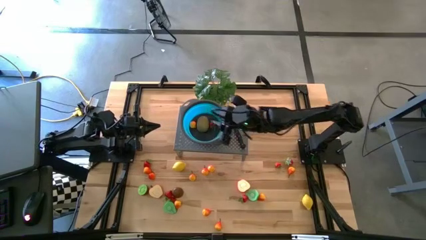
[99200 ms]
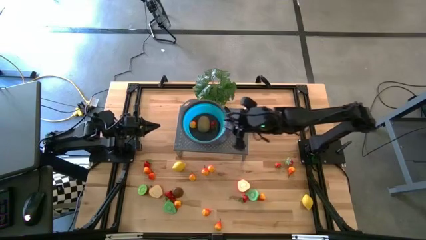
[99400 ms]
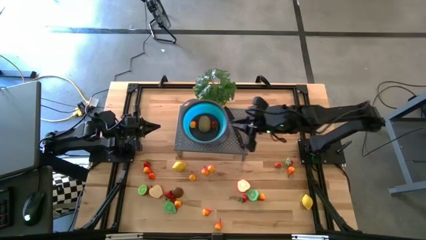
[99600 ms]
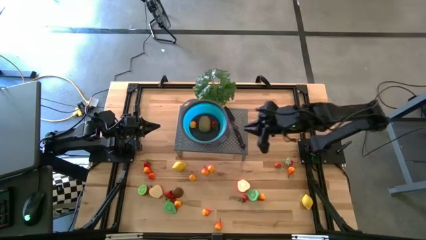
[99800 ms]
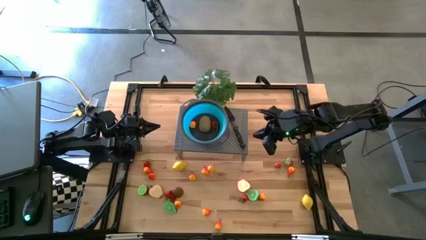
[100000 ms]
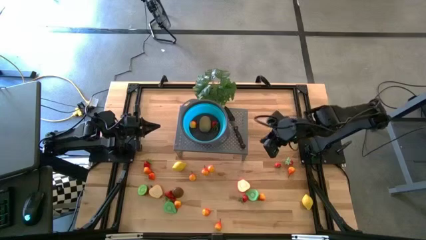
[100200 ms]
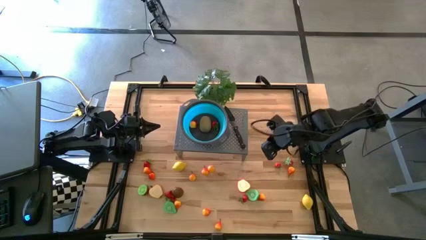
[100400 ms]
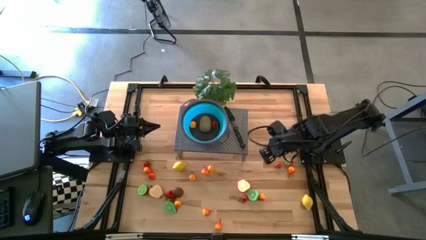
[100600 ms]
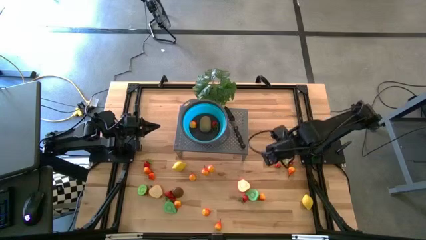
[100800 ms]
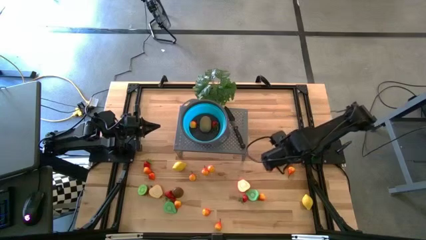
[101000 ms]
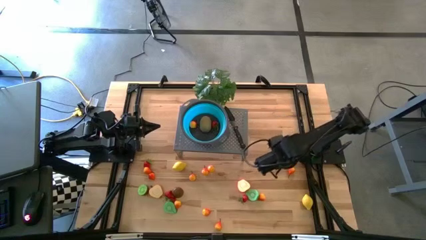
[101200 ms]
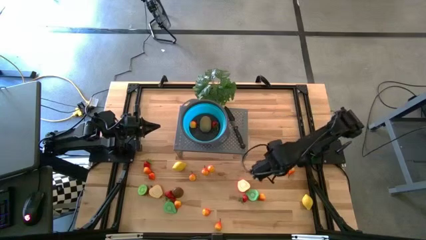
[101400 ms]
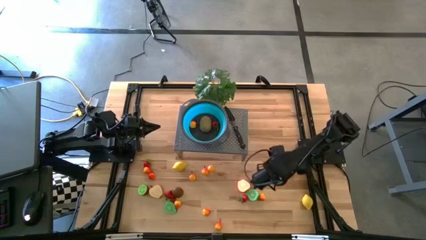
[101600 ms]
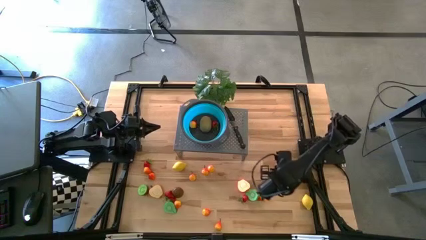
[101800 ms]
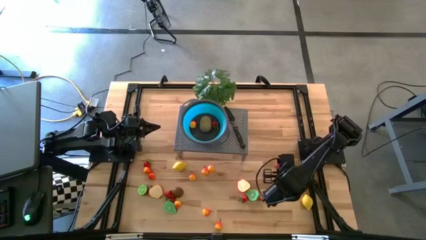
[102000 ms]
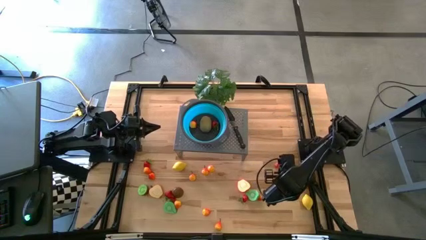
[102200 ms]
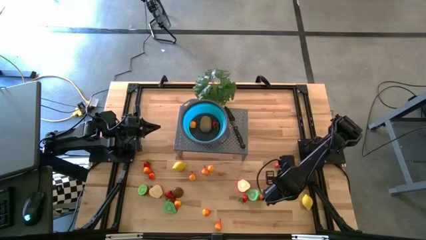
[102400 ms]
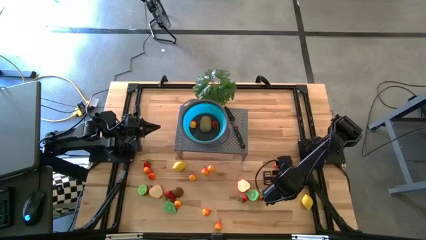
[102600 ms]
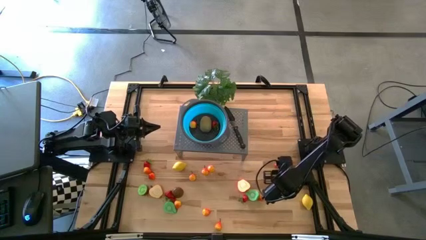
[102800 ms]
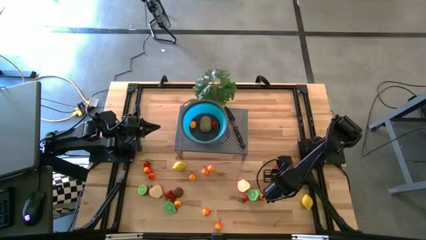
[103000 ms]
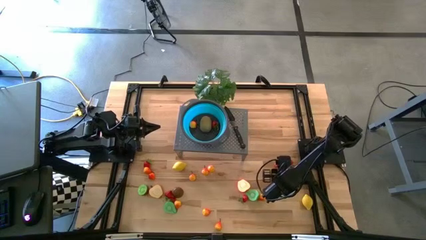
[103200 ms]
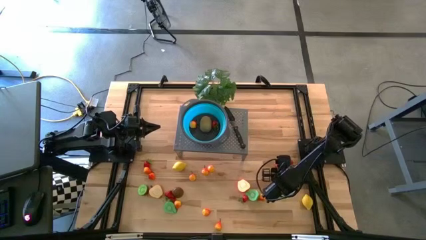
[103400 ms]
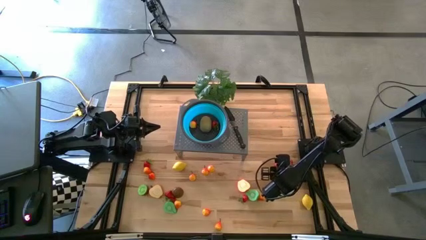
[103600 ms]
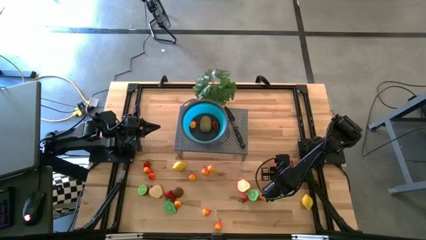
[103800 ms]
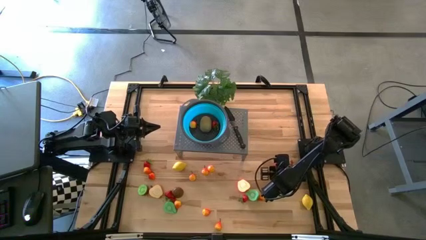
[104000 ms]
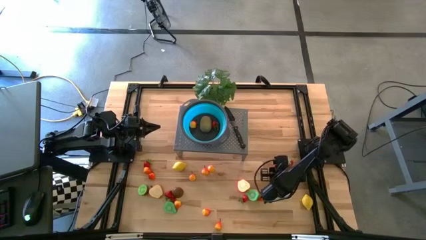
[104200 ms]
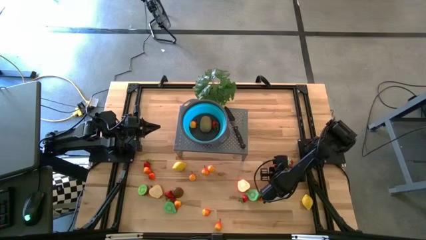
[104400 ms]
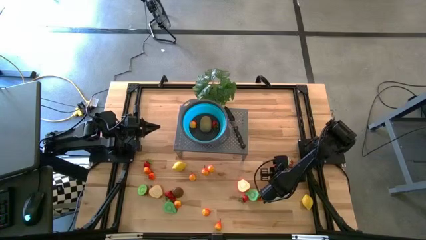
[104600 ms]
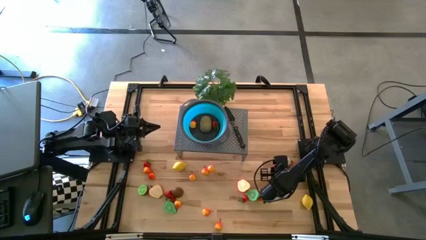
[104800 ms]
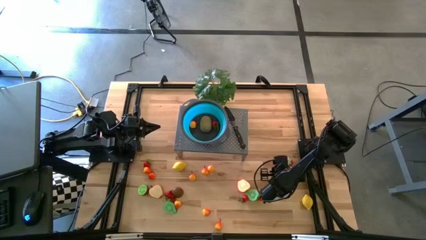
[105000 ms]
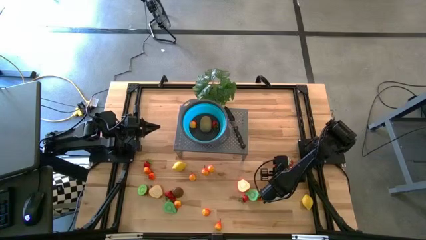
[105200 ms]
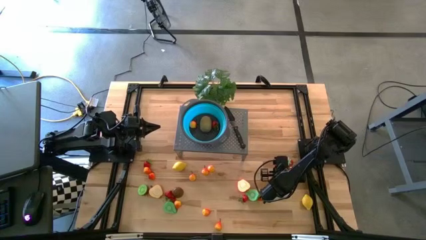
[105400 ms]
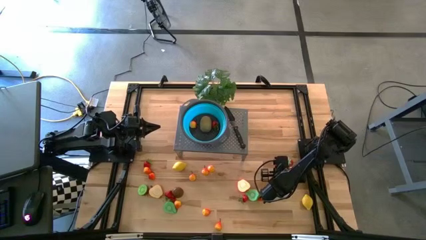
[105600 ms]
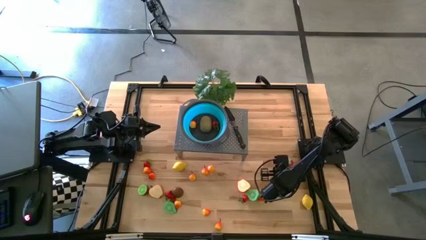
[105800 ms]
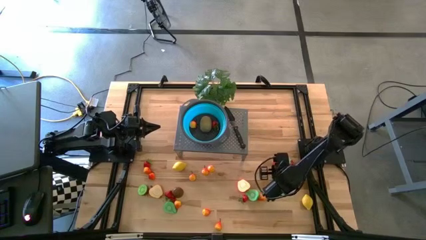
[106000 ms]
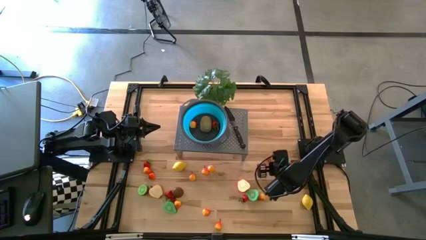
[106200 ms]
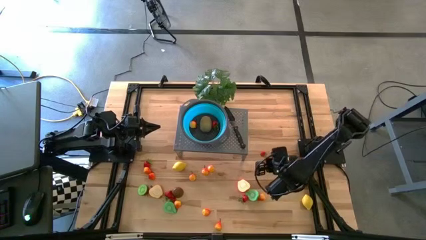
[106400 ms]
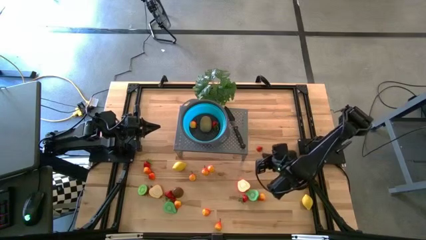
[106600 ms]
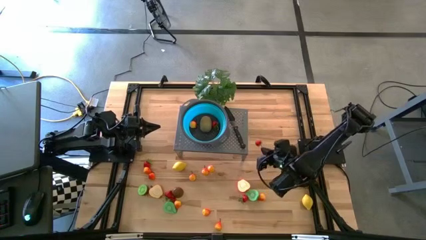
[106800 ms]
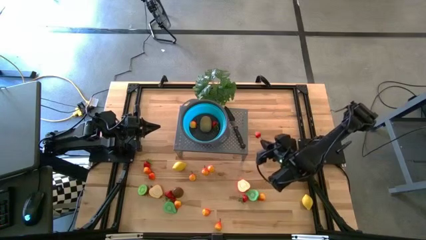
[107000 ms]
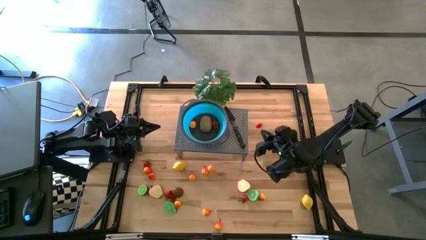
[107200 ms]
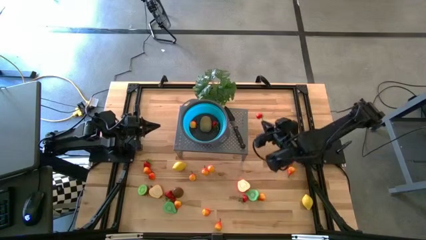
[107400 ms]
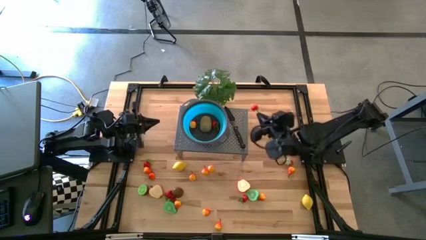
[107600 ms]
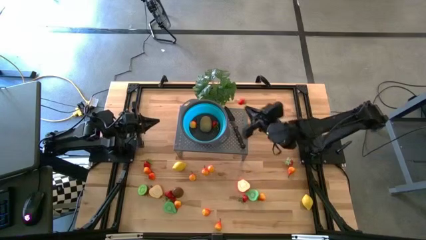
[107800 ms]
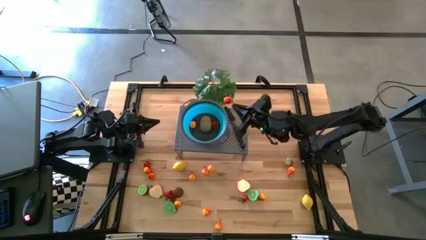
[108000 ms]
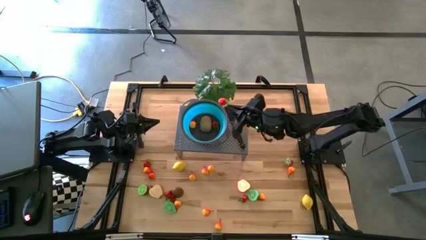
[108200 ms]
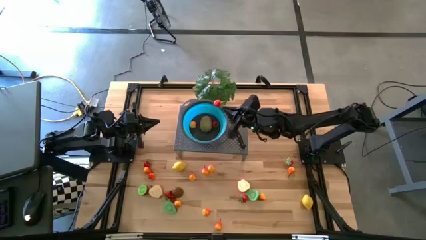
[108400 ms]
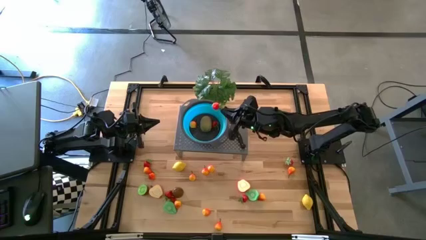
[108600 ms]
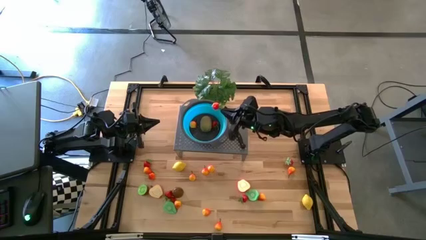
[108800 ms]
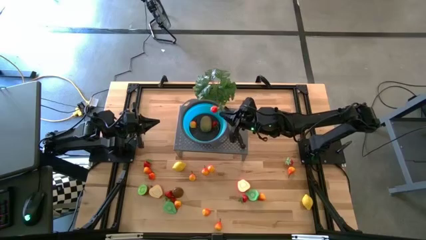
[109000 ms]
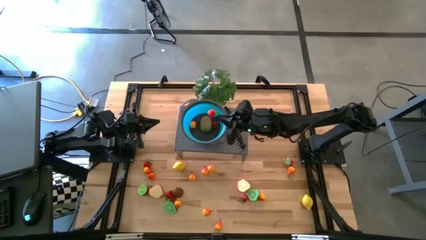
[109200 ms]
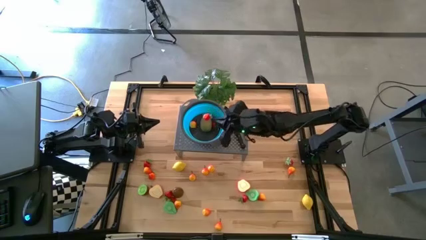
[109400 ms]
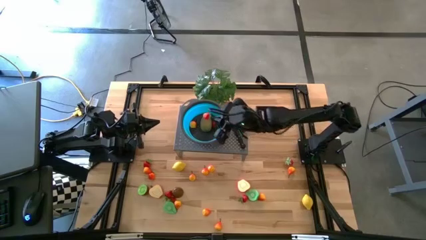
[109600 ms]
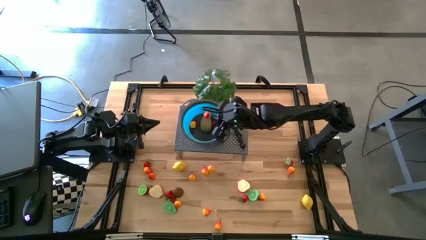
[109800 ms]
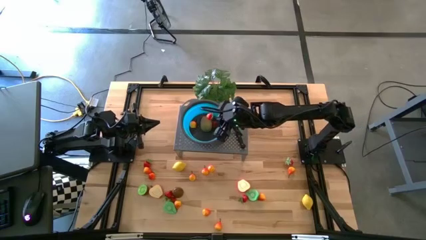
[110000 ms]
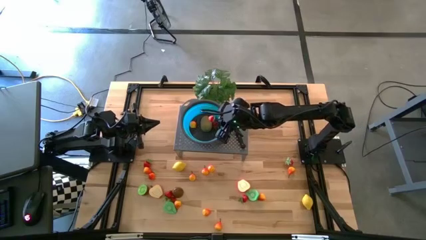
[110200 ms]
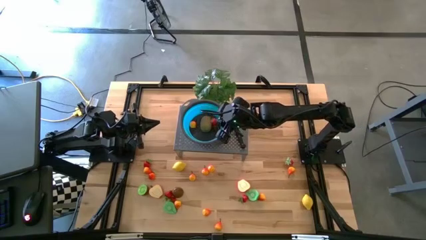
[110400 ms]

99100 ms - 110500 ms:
Task: Pick & Place Fruit
Put the strawberry into the blue strainer bowl on to the shelf

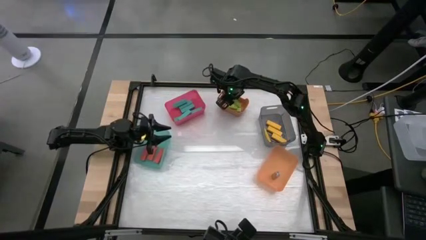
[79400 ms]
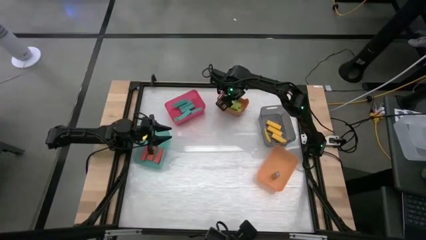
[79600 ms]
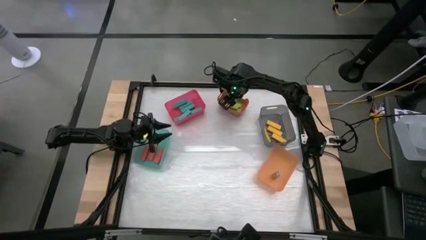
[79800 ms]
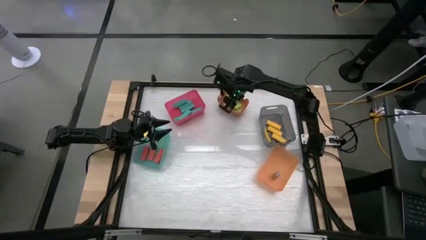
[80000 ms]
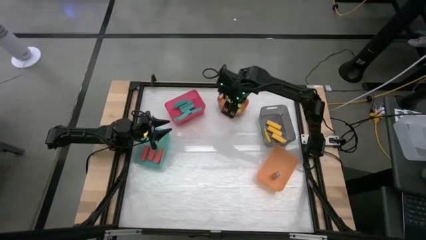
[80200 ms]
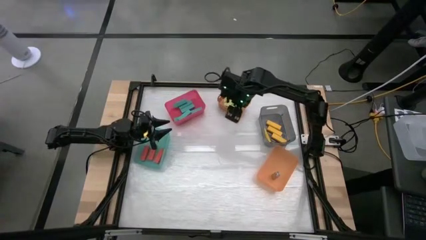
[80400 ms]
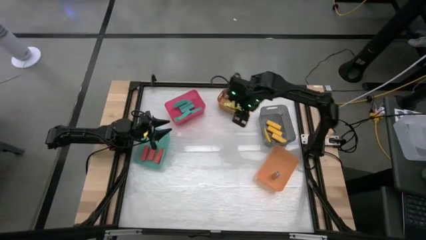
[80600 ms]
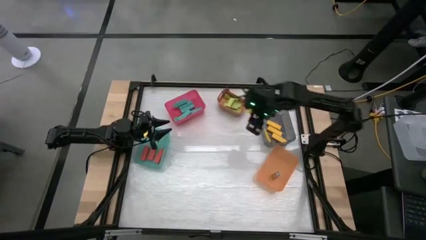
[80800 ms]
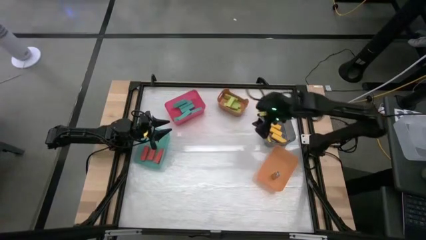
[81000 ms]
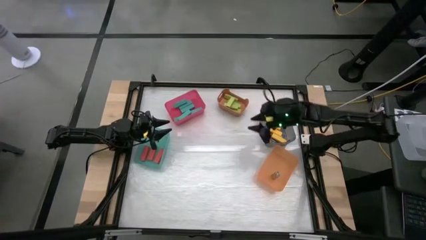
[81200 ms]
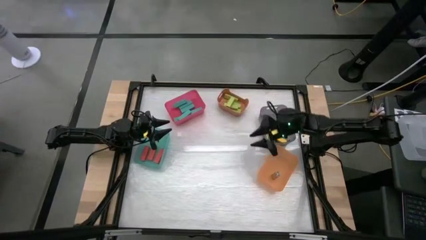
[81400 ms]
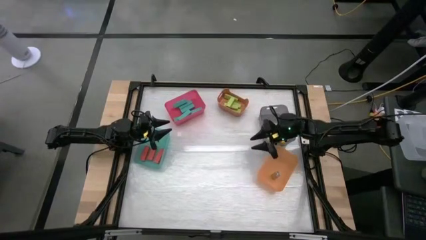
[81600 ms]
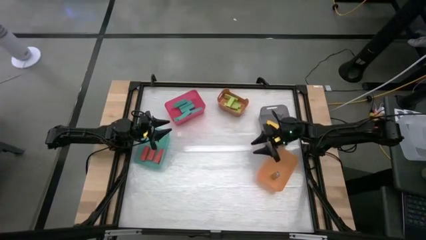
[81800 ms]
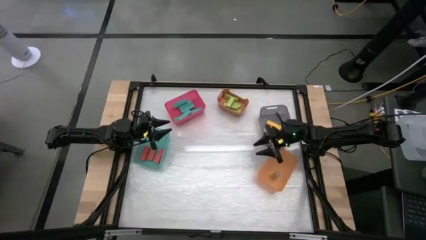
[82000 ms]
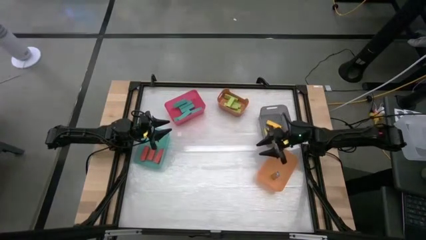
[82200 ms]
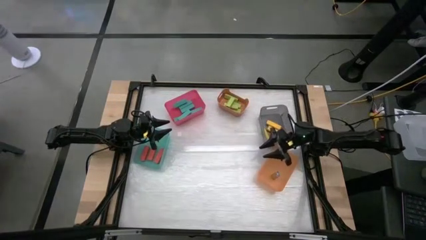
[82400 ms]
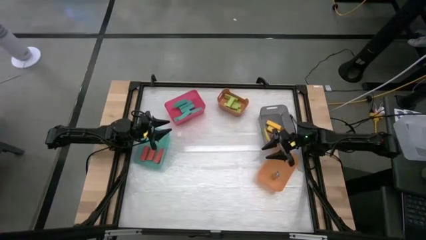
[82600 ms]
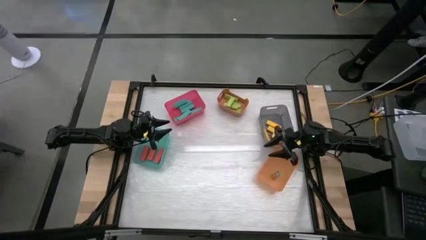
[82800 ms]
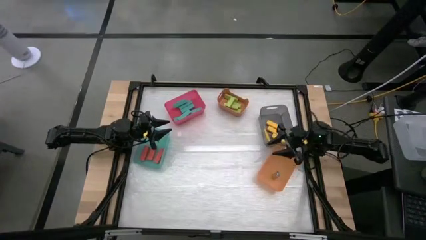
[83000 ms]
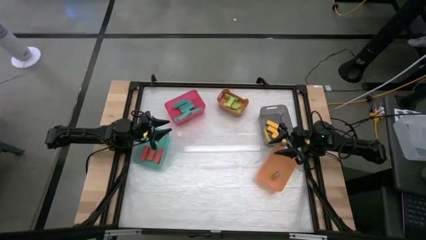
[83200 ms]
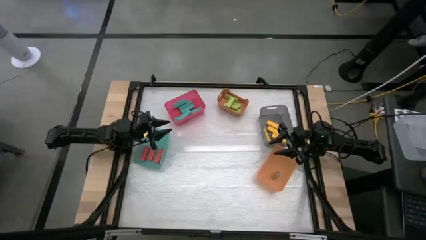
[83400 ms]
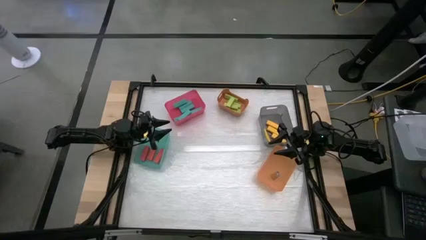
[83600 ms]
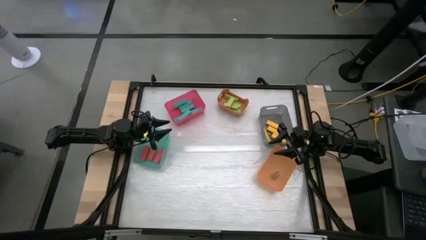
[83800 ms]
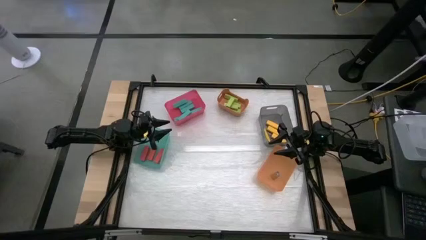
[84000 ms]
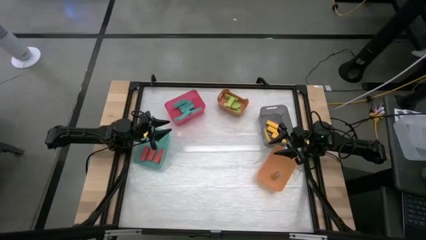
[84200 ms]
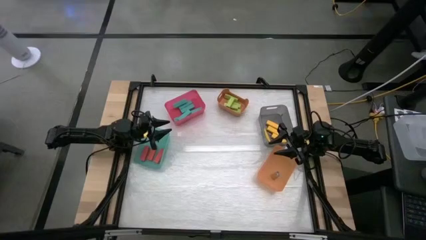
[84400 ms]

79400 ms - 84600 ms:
Task: Sort blocks
Return to Home Position

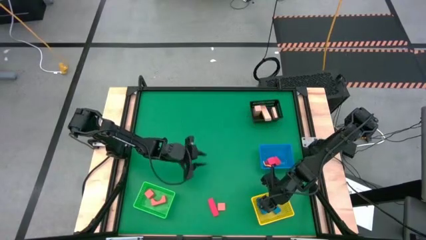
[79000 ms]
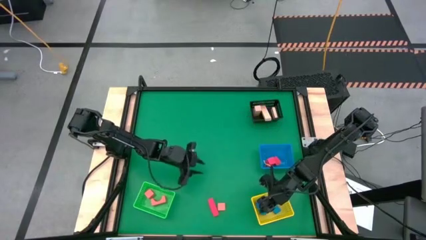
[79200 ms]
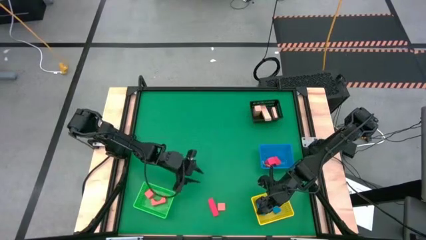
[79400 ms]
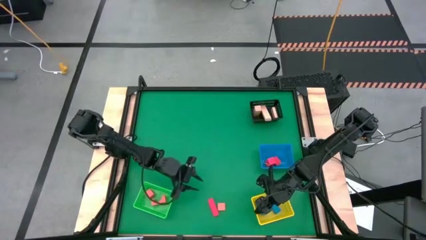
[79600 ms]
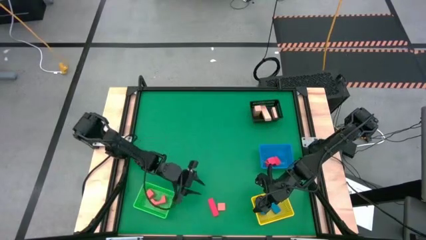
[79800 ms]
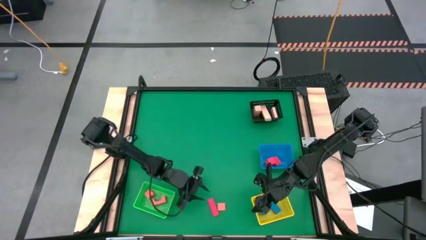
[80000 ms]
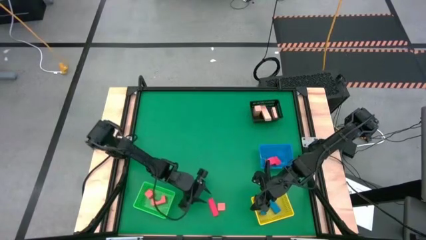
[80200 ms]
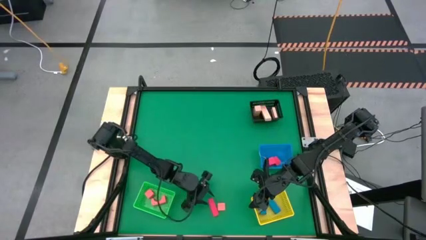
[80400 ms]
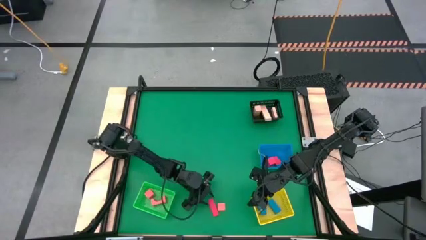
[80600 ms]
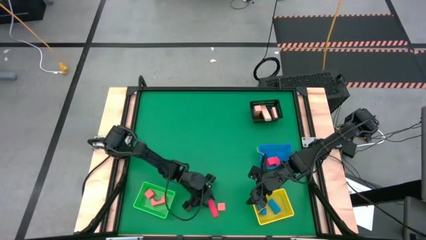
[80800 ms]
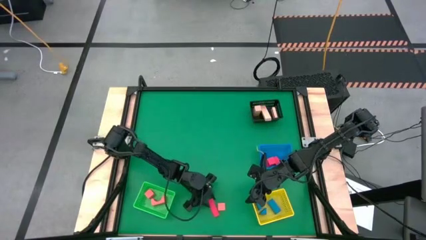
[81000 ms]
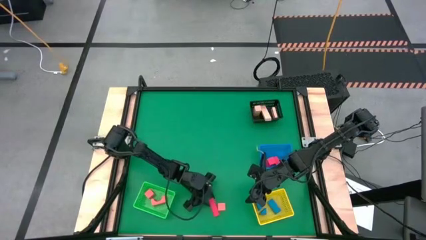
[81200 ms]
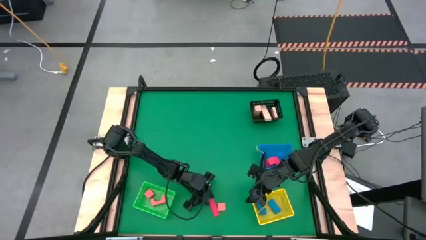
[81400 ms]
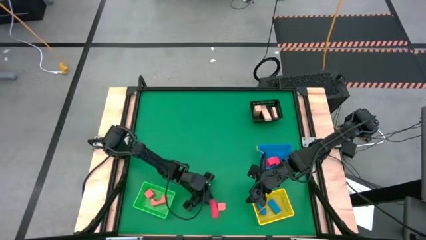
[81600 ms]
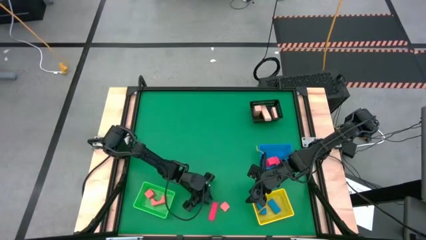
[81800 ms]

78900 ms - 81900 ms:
Task: Sort & place blocks by color
Put the red block into the blue bin
